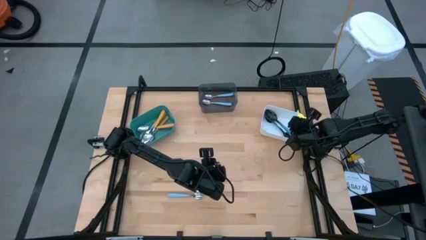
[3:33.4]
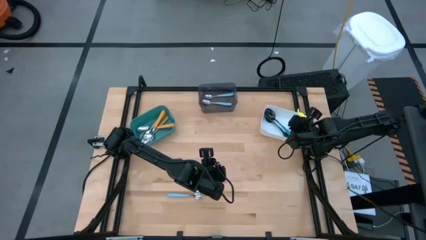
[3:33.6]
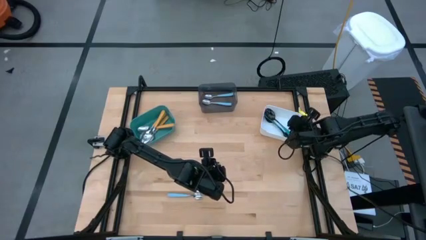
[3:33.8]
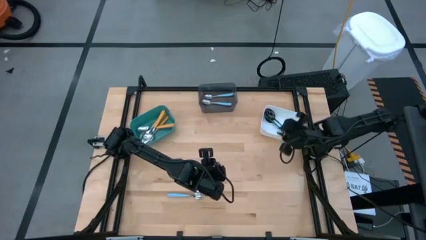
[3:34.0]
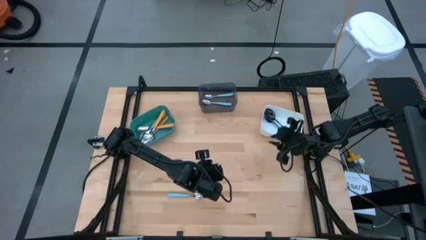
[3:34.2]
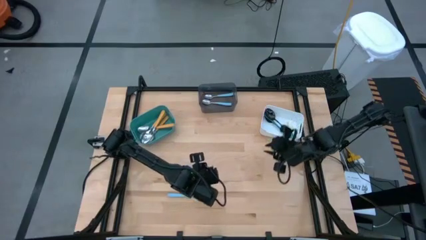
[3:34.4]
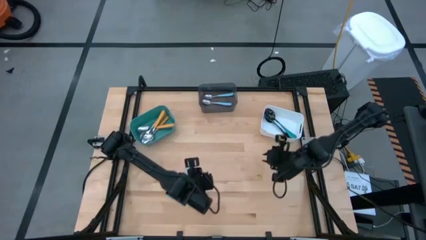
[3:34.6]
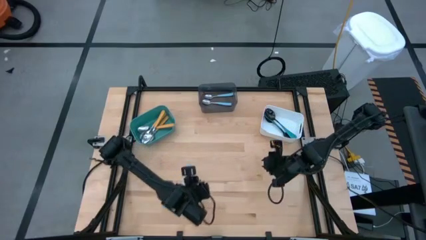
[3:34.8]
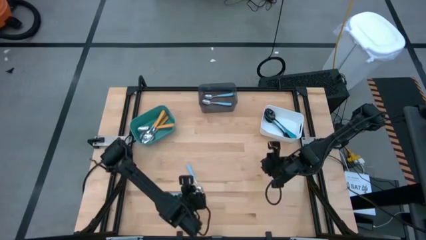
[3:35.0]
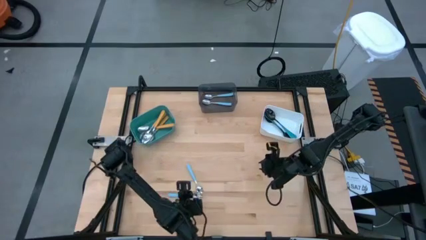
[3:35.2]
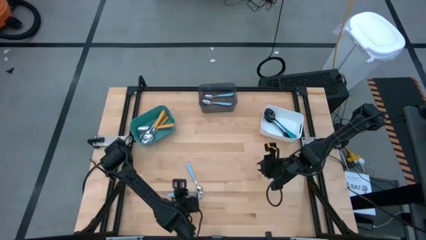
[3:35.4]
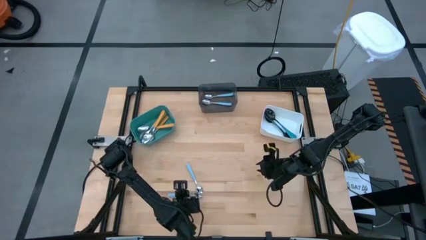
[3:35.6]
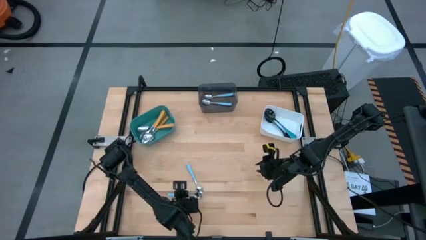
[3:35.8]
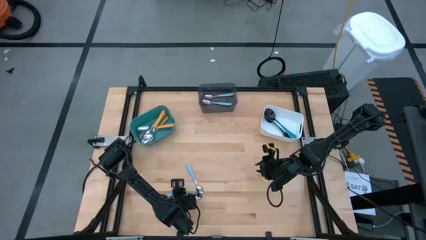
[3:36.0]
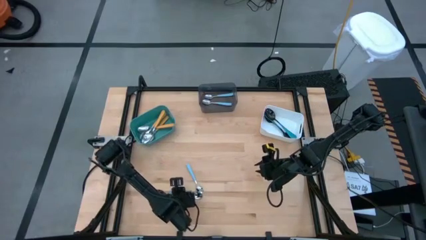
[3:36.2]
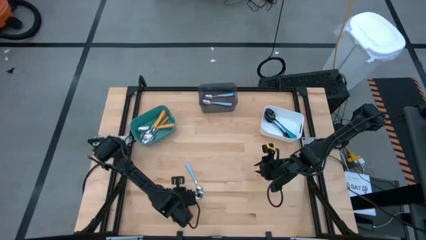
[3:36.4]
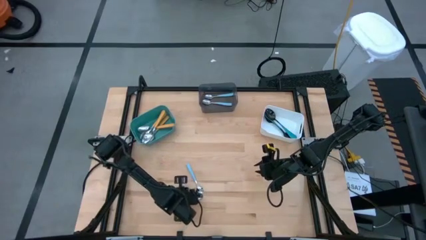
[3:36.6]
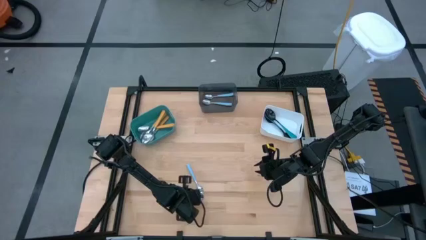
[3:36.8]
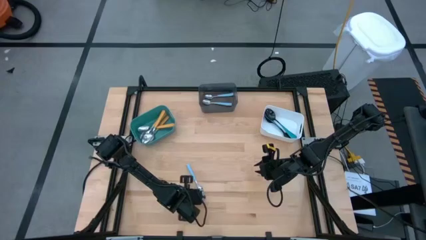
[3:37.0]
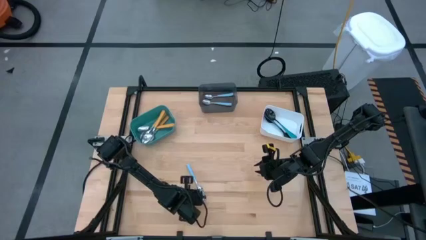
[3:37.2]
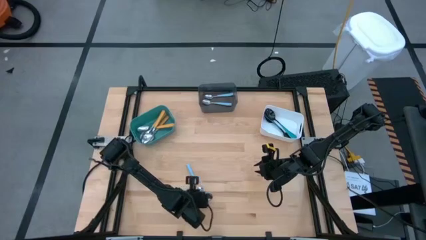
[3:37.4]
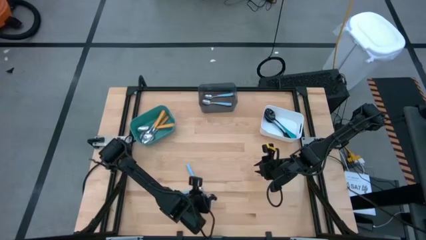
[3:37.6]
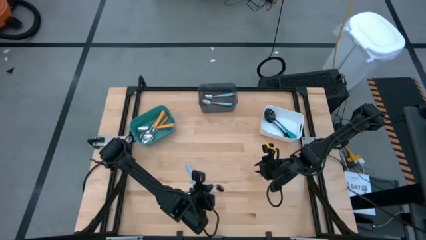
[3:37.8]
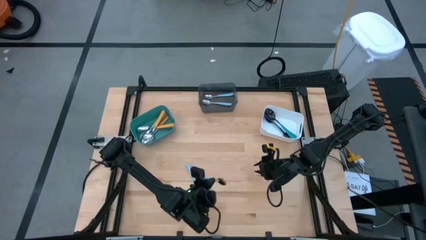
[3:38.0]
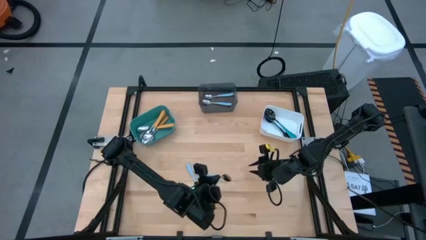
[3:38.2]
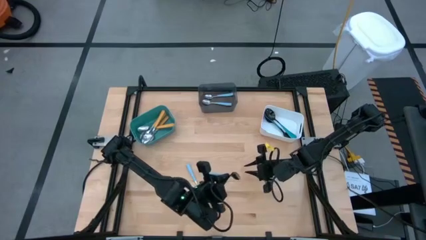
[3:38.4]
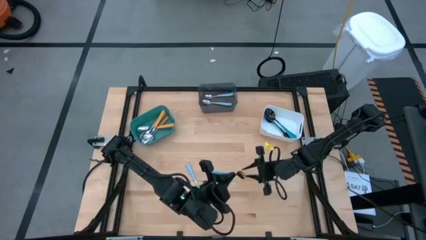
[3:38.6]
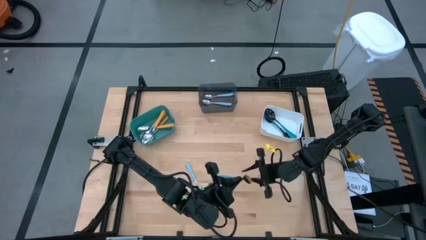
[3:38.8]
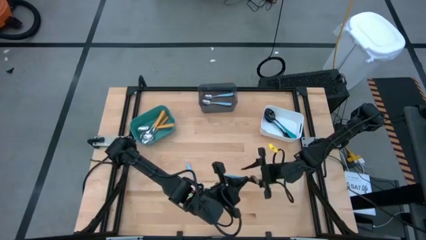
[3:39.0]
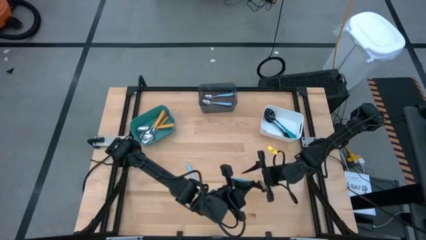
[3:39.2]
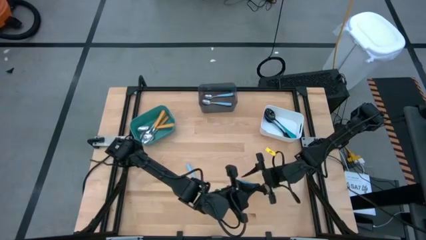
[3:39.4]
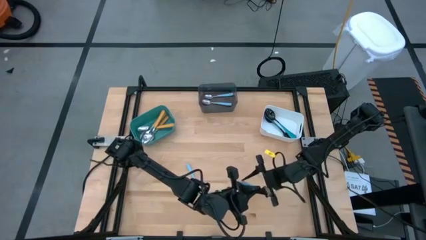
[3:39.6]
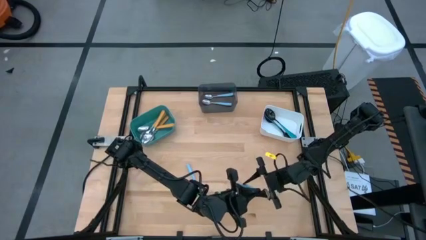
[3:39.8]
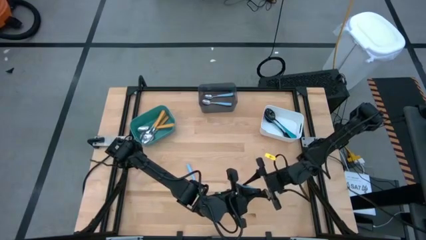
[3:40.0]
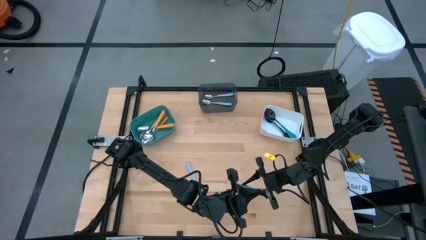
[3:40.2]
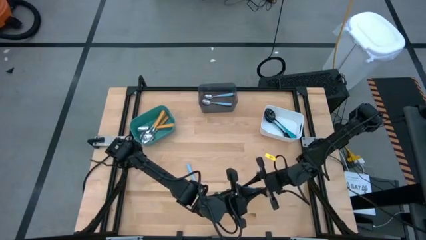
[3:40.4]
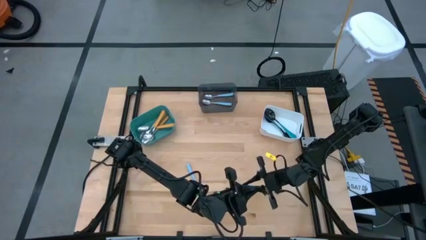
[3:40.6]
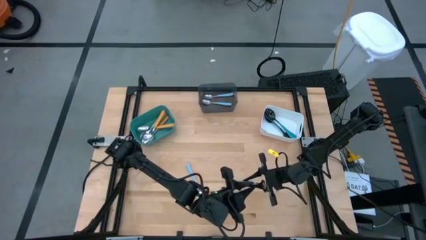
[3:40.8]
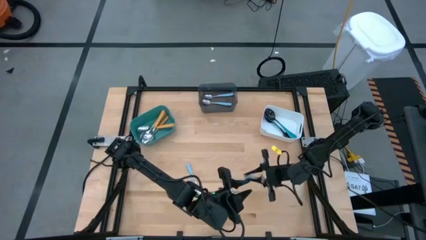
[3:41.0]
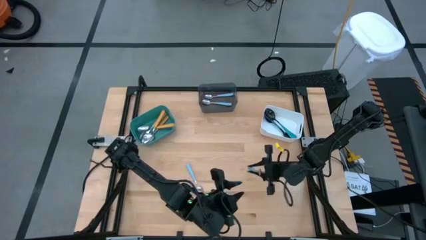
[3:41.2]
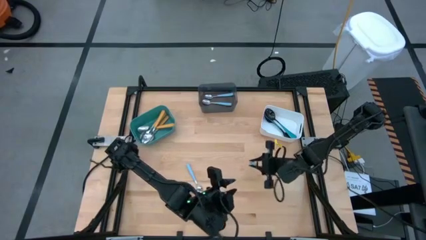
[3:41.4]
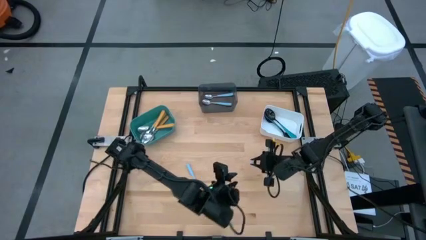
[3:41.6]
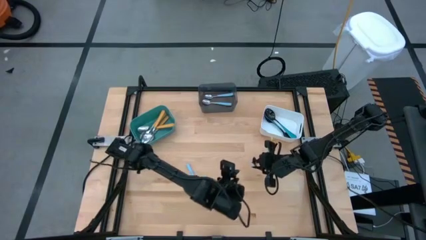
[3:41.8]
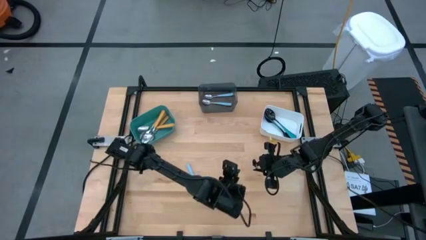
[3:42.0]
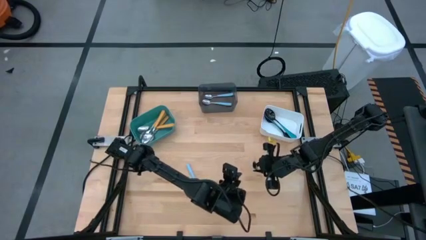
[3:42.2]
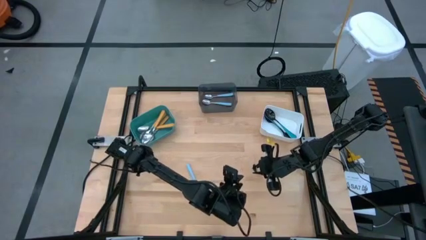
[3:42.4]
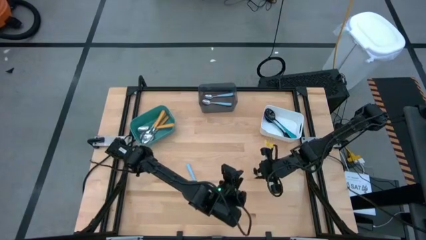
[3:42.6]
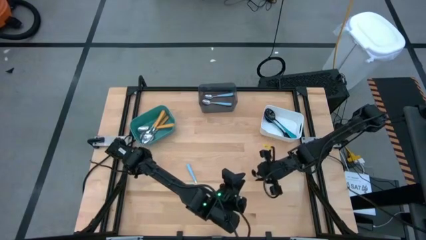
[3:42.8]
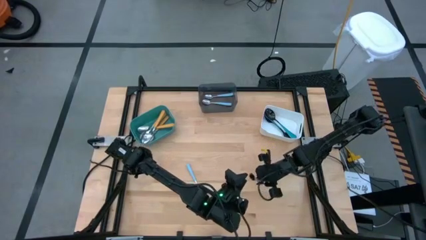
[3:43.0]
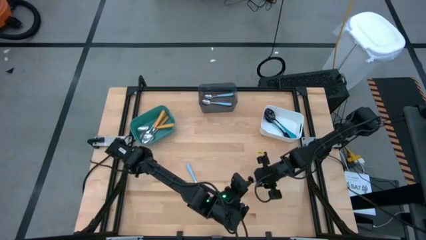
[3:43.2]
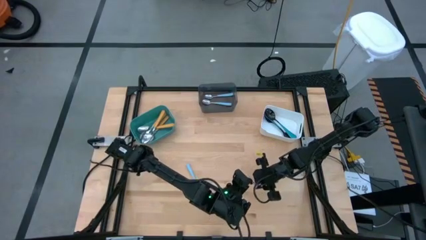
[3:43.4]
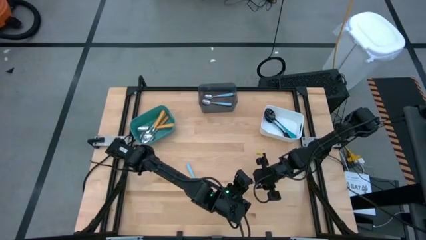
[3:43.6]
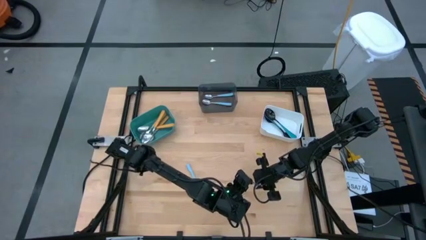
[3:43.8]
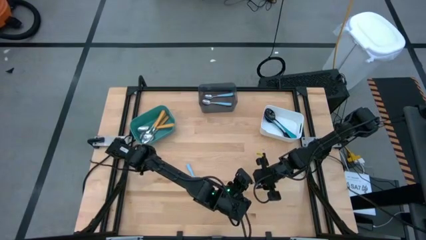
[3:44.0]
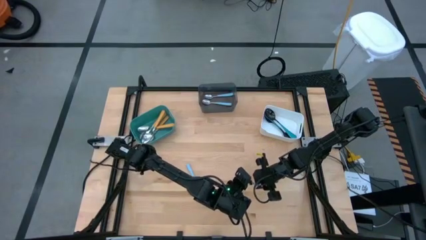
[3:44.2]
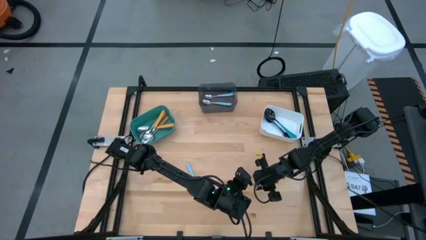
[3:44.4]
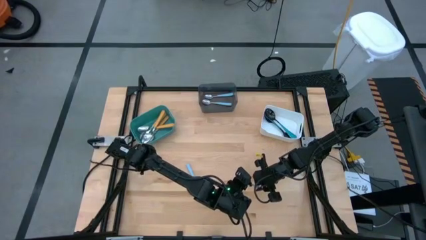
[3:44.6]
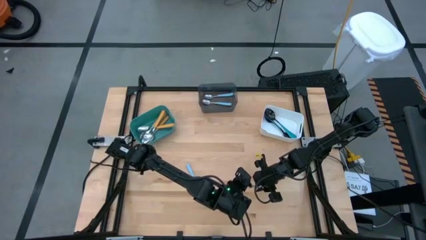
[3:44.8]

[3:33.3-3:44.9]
Task: Sort silverware by color (type)
Put the light blue spoon into the black bin
